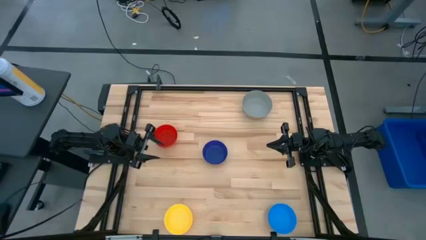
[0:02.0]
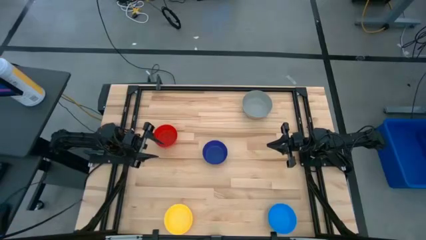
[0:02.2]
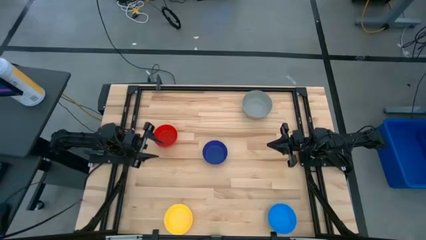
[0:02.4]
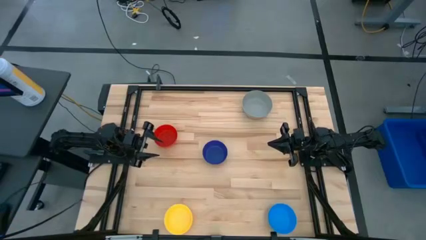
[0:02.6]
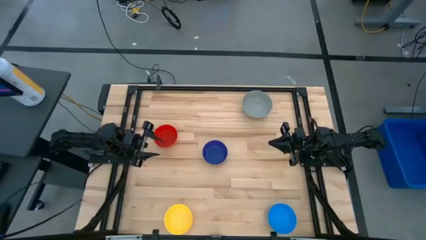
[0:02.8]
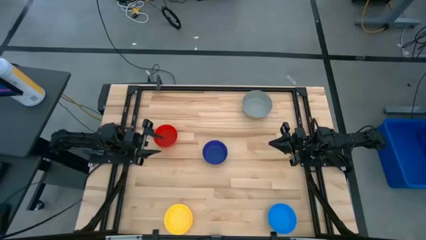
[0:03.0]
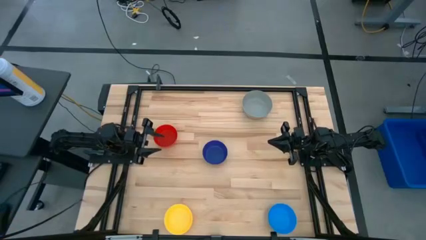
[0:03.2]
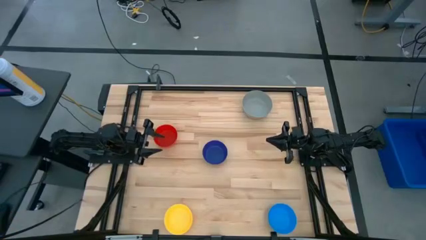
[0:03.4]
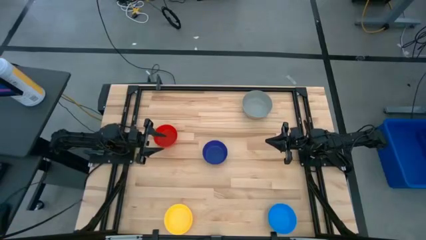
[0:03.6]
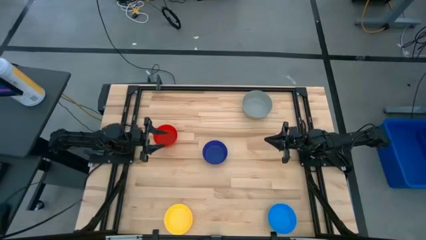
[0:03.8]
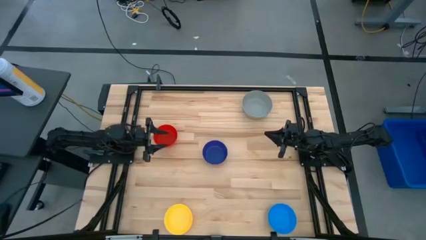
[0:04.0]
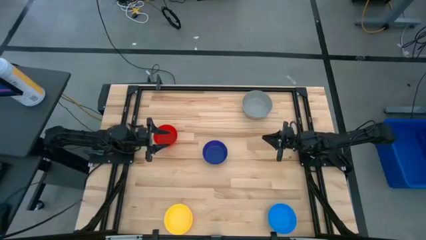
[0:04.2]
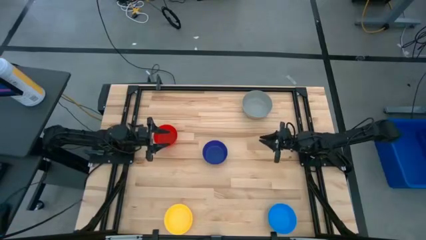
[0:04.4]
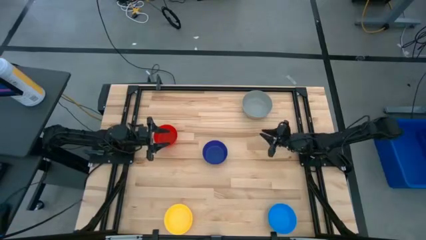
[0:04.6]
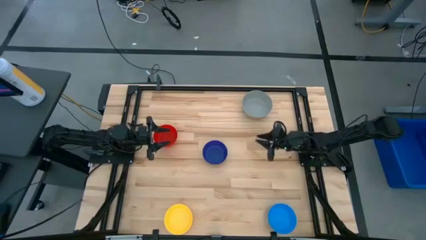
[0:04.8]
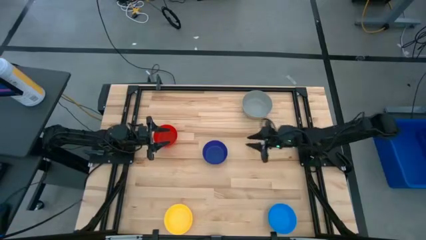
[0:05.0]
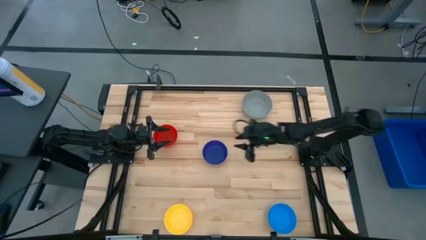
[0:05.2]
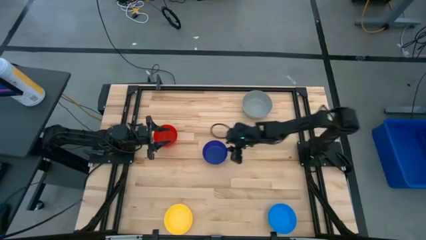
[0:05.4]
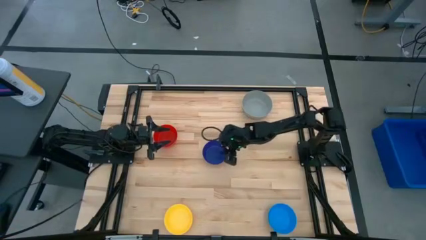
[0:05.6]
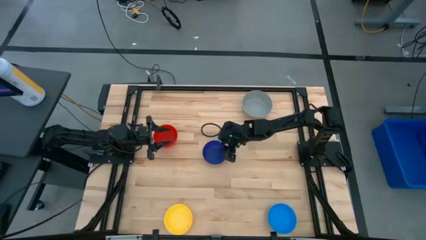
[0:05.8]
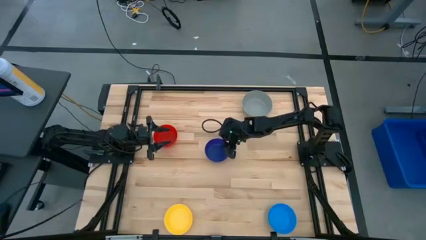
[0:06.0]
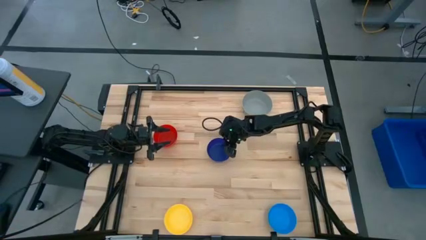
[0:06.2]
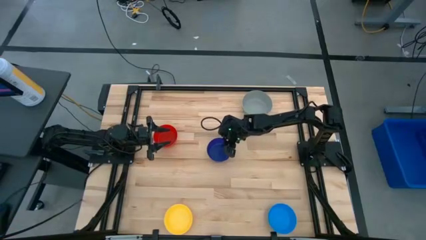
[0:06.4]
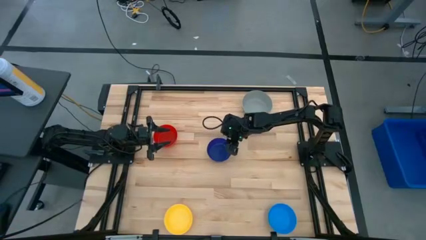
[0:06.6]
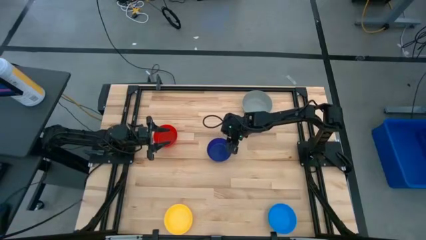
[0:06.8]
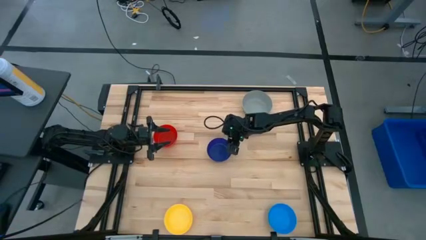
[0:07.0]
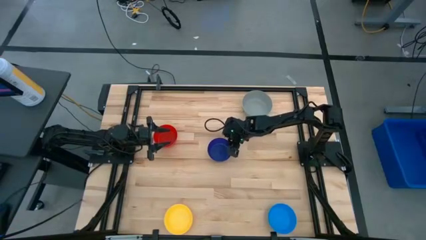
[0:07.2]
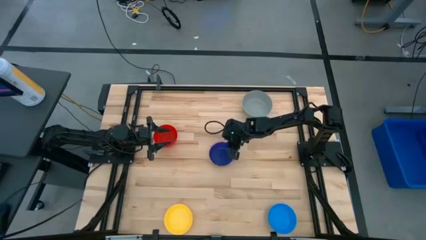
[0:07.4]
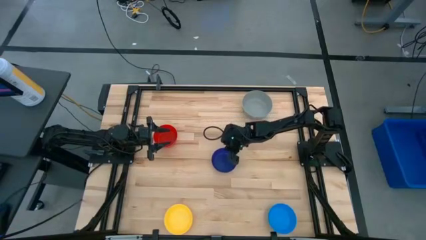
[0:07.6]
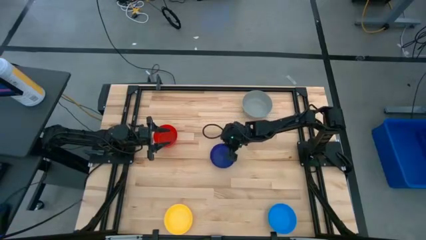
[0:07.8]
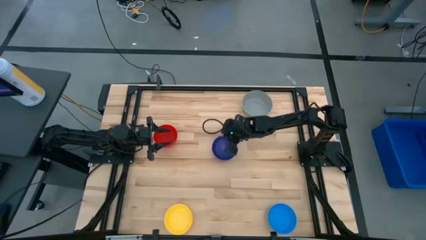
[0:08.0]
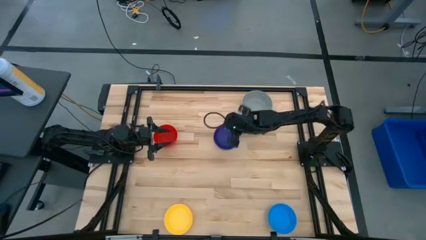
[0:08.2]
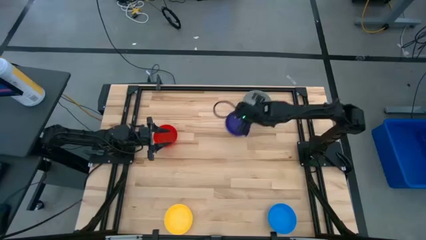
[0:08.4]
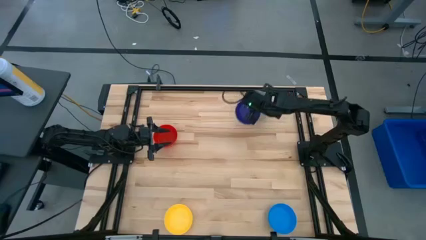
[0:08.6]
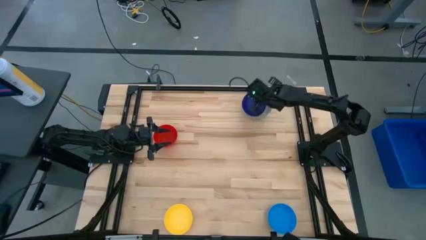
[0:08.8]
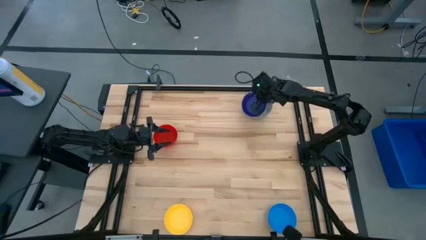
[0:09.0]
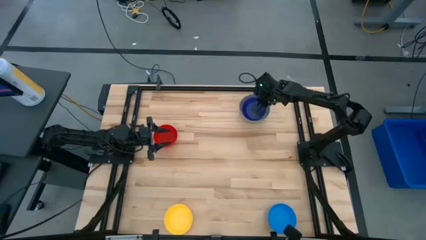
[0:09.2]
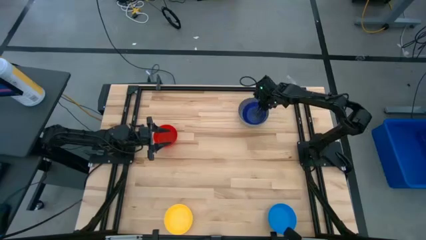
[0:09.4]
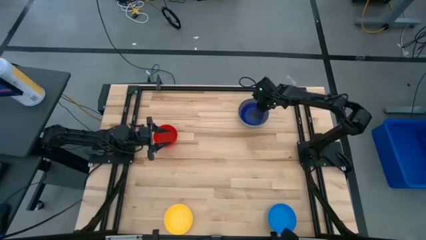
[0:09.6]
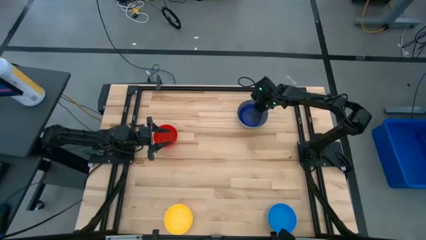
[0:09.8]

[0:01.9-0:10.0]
Stack the dark blue bowl on the gray bowl

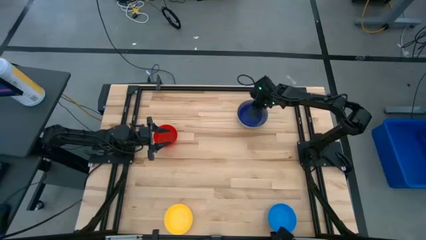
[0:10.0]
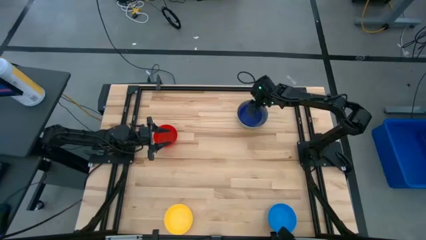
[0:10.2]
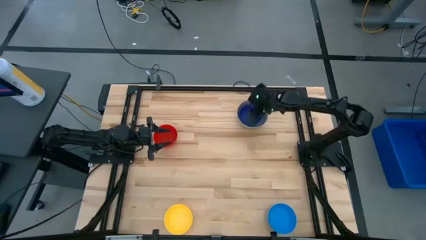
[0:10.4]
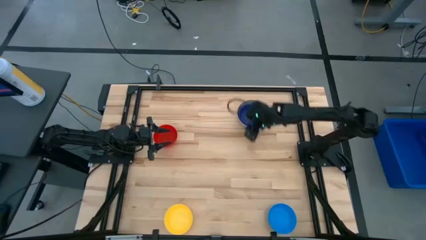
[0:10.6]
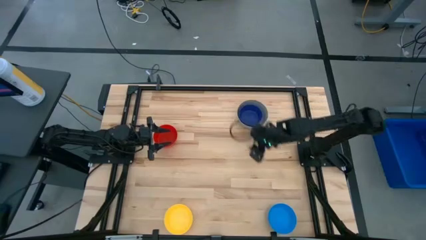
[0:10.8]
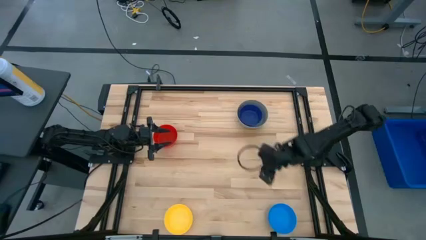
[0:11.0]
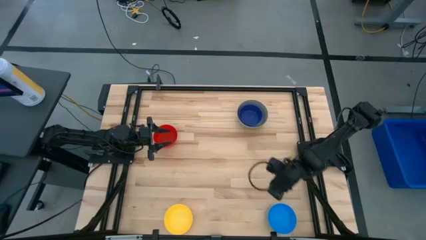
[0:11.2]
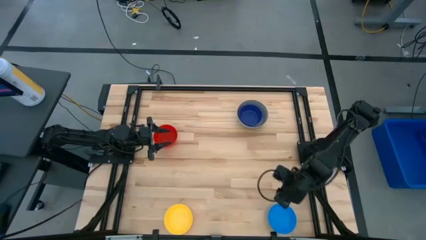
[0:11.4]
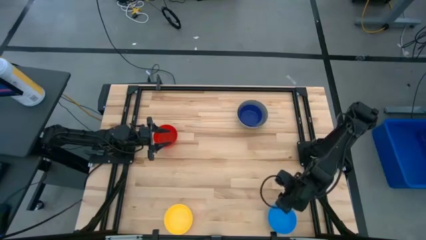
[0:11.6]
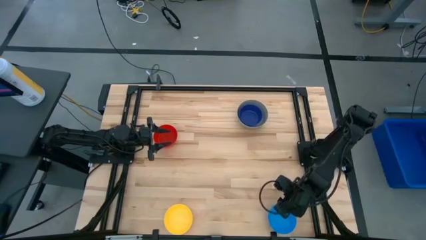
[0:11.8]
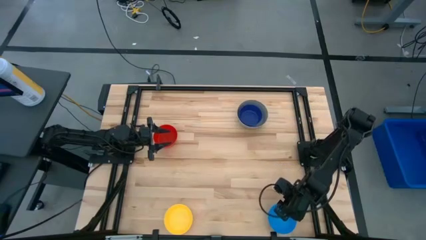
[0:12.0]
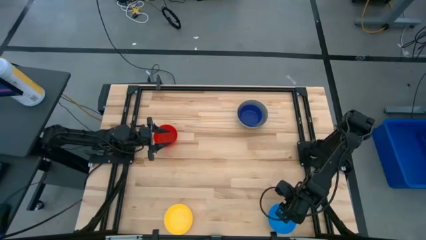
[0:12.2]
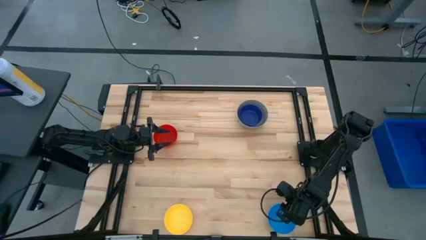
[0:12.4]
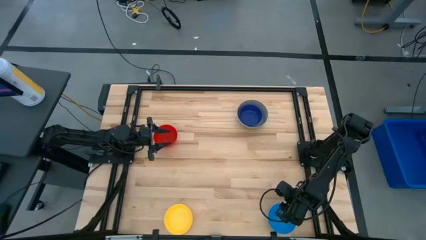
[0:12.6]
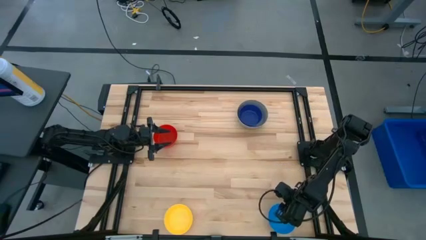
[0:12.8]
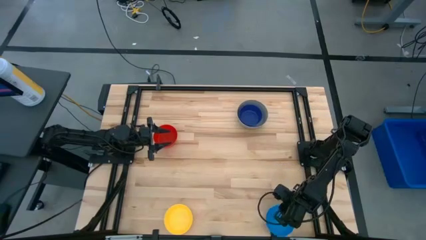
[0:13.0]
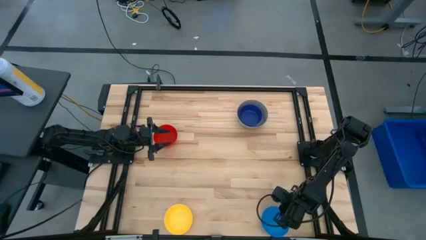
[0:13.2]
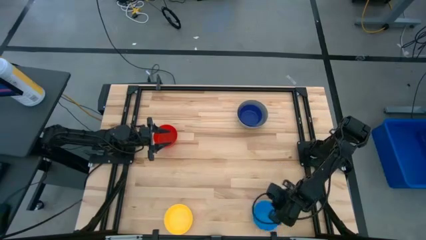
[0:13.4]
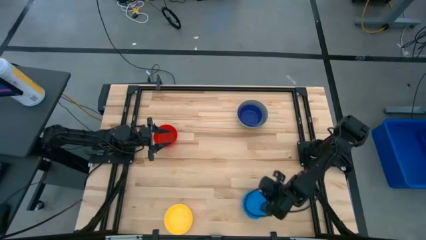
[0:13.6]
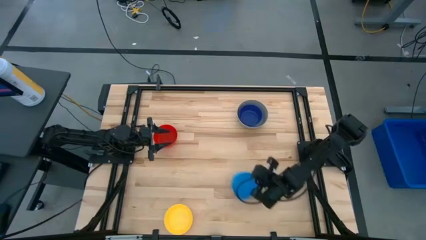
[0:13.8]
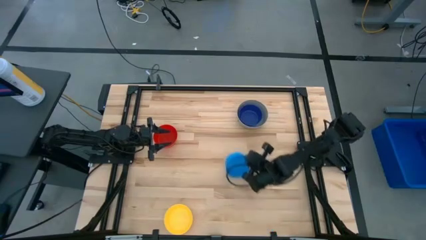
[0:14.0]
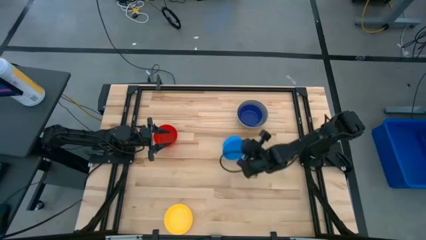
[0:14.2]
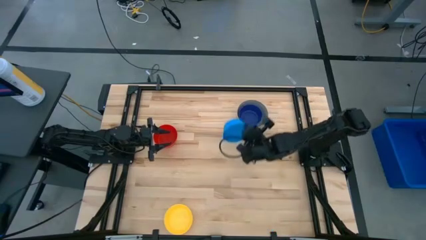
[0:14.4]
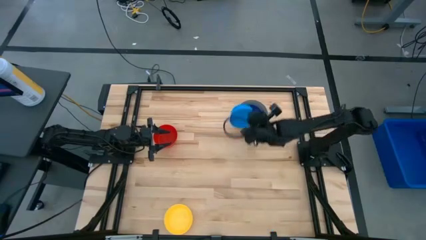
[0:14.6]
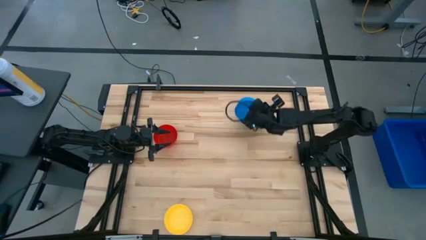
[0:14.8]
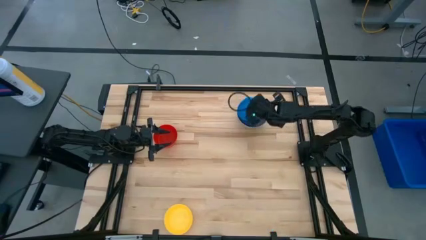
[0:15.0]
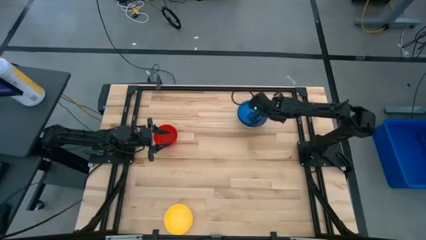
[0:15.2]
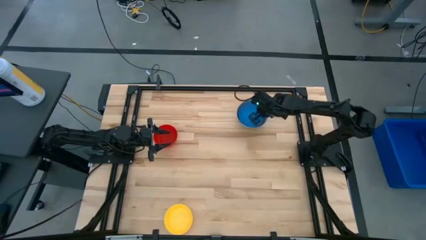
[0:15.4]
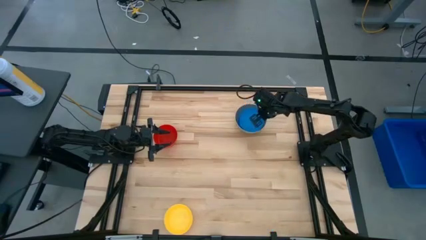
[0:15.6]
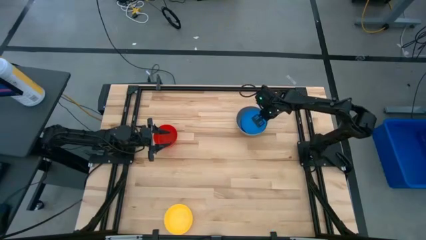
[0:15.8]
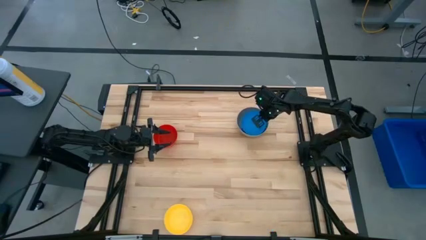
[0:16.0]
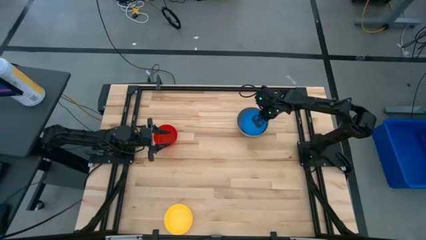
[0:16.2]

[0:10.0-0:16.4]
Stack the blue bowl on the blue bowl
